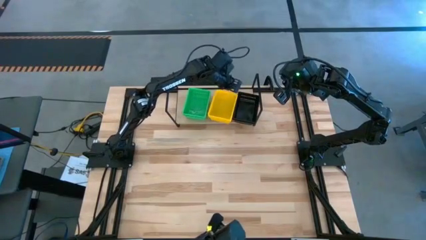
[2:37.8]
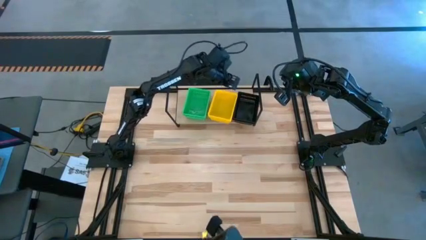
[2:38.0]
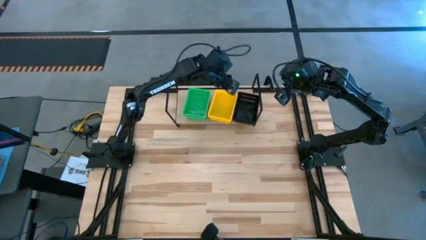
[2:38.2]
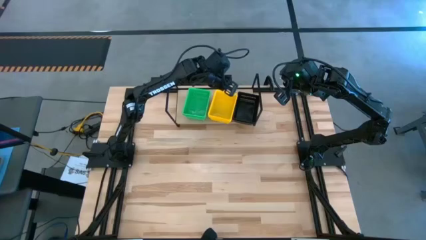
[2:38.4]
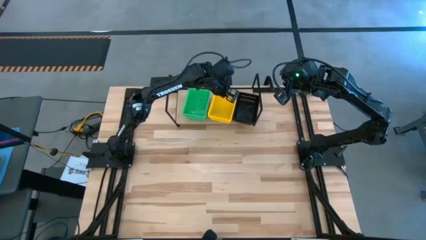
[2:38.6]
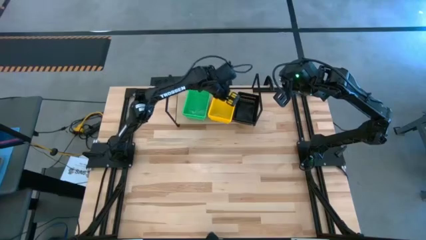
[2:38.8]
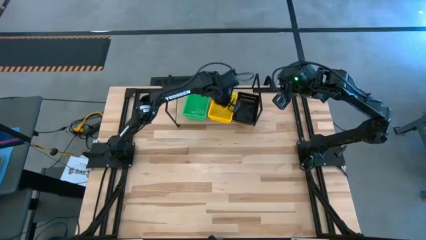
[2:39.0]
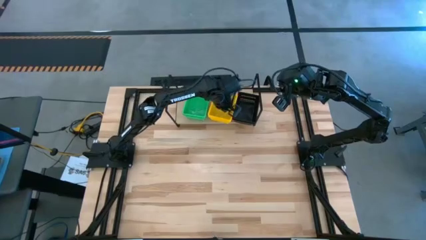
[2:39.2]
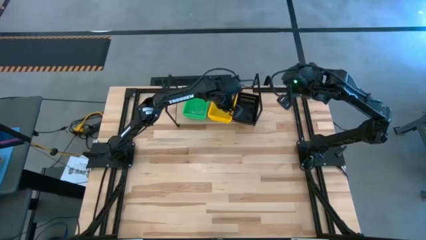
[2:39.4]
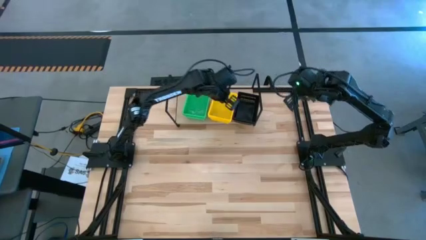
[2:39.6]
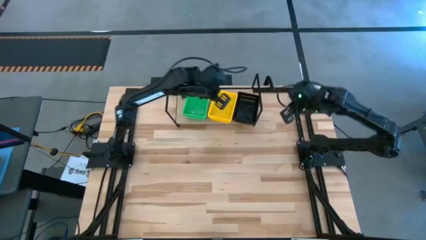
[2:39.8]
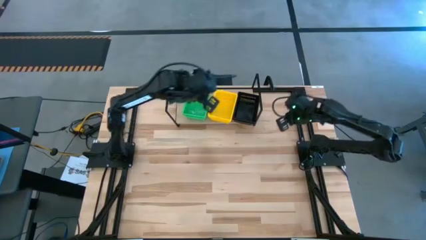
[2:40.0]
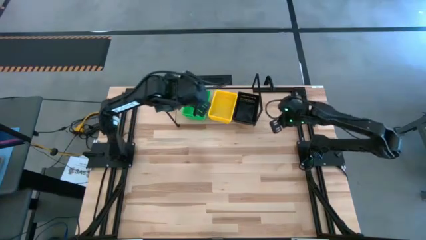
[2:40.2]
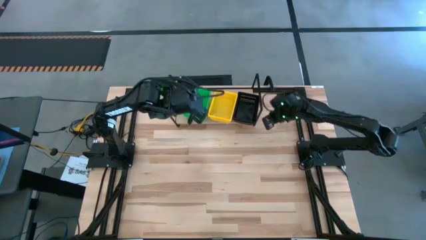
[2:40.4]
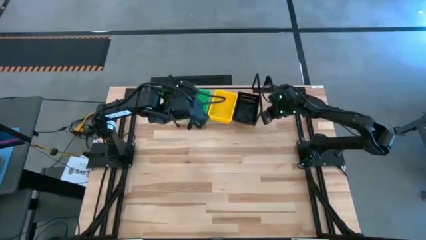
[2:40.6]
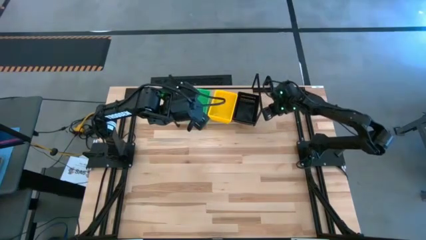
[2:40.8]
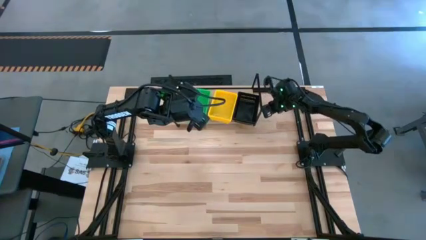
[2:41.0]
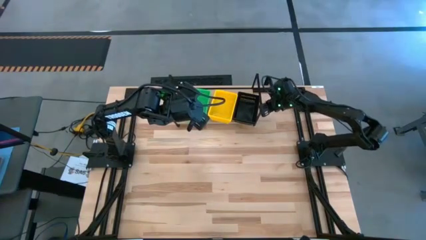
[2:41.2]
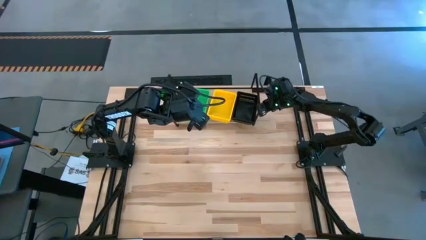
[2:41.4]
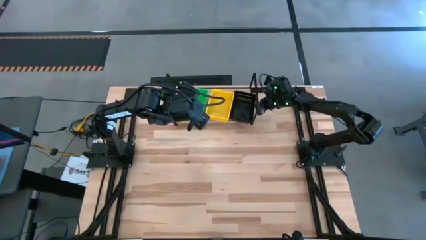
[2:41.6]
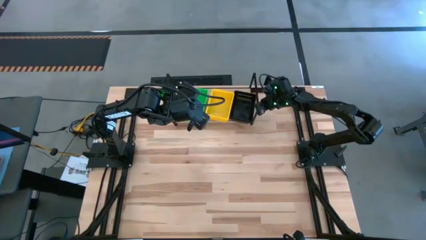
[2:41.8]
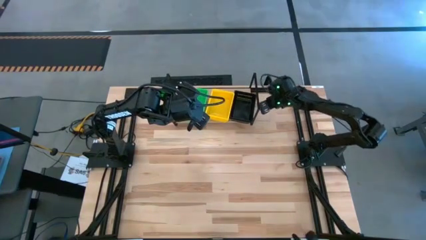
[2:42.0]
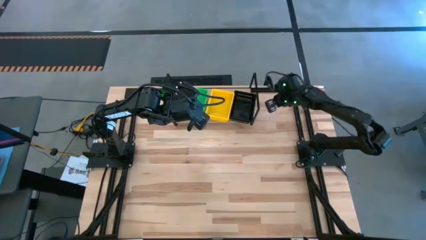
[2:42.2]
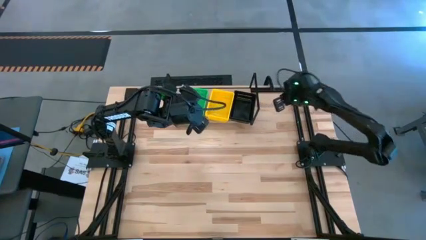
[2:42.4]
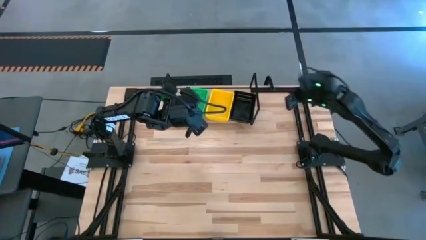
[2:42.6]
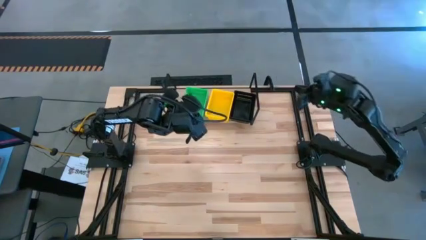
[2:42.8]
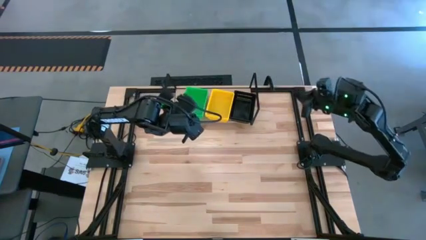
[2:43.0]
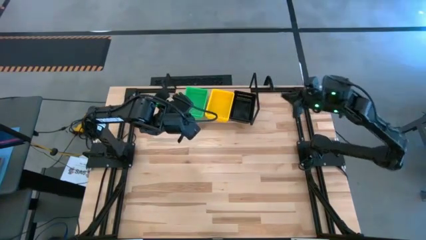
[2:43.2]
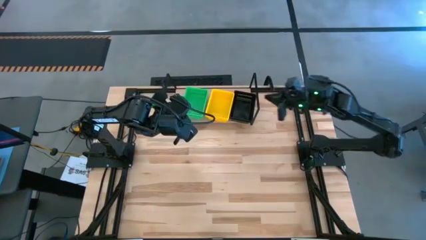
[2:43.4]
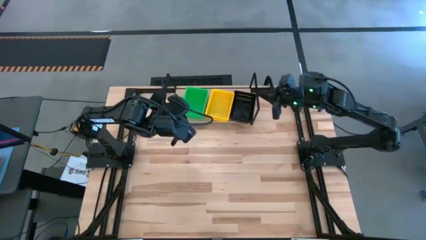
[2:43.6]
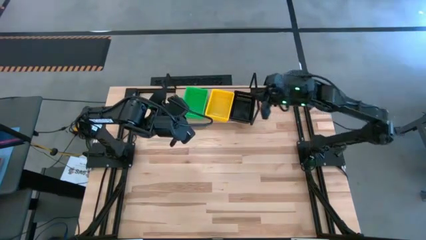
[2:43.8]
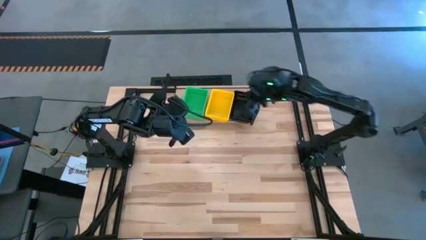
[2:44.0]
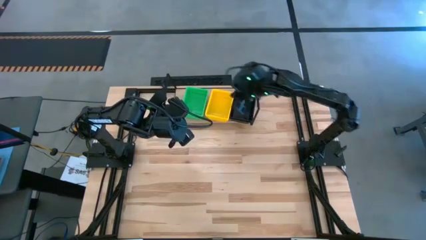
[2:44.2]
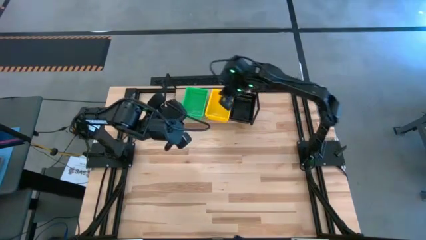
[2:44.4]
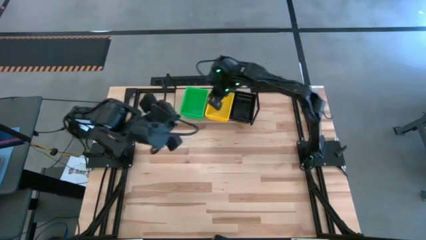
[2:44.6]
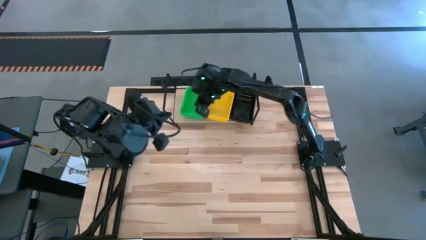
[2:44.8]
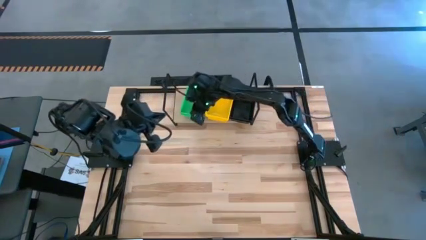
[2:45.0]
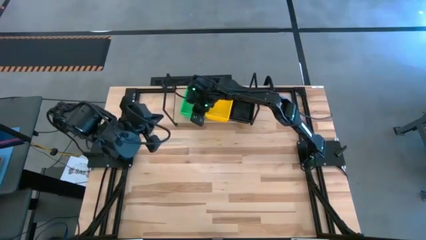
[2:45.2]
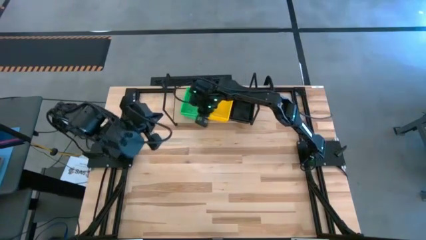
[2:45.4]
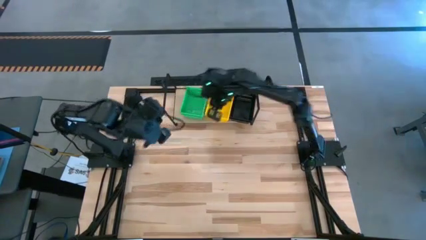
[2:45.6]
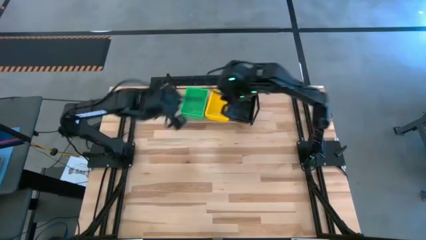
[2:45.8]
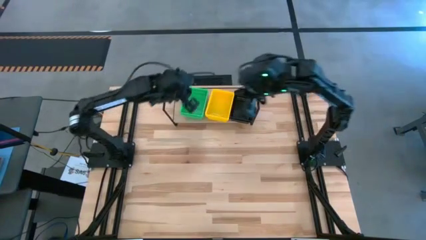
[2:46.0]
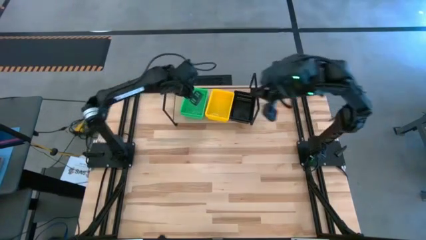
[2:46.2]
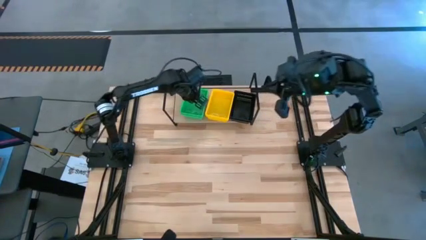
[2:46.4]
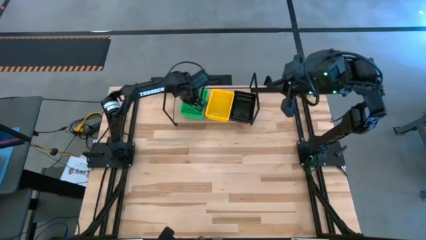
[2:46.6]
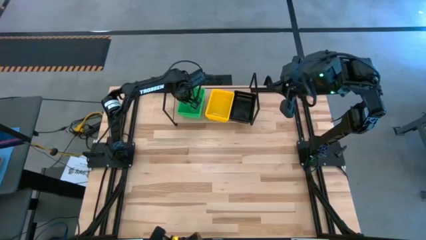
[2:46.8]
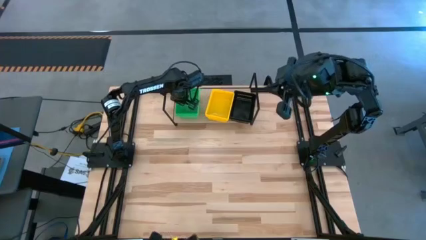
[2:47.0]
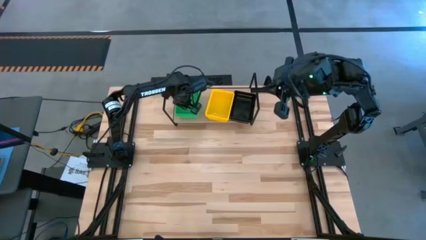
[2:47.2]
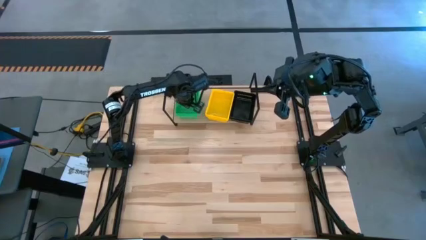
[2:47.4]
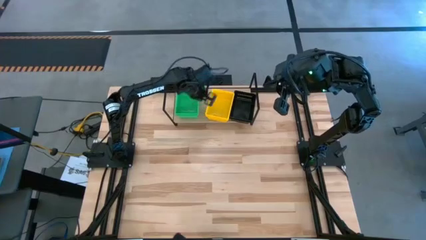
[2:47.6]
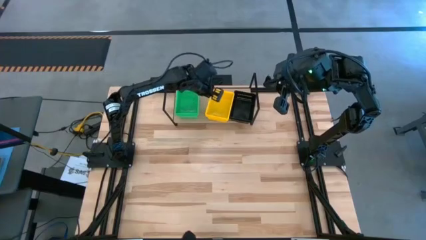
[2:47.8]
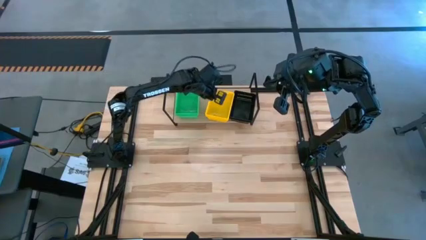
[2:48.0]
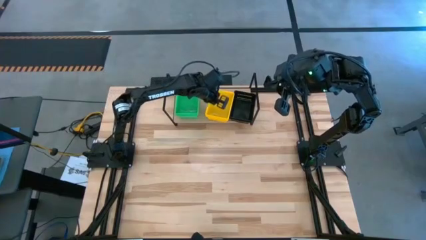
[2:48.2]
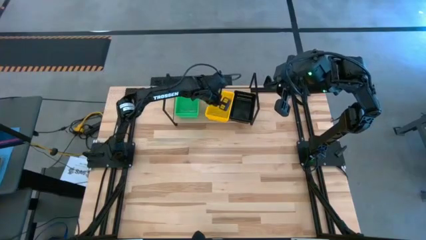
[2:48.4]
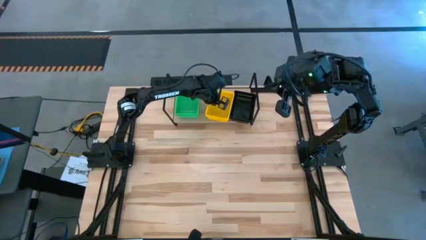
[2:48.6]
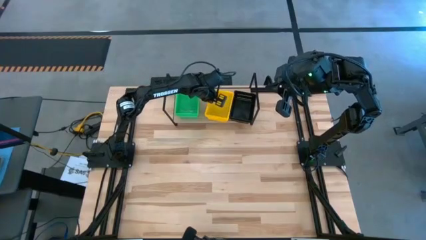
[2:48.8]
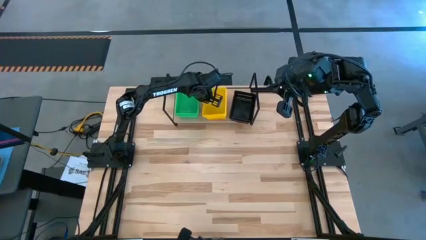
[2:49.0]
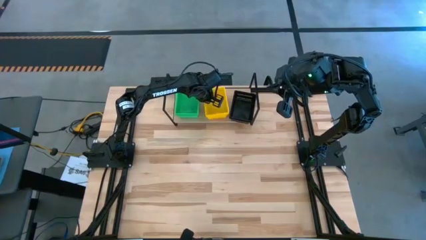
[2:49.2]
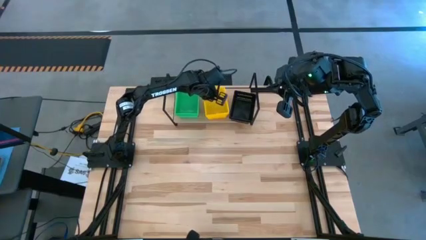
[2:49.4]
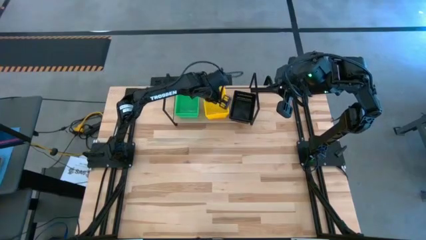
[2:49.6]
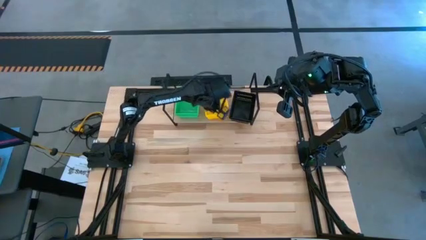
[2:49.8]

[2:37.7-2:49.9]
Task: Stack baskets on shelf by color
Adjust the stacked colored bins on the shelf

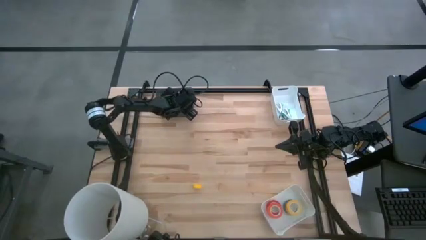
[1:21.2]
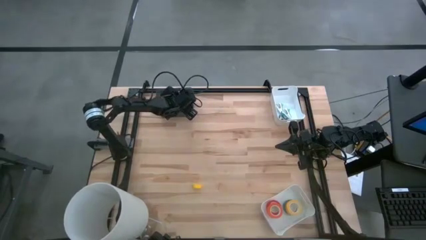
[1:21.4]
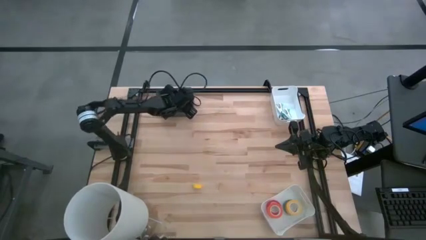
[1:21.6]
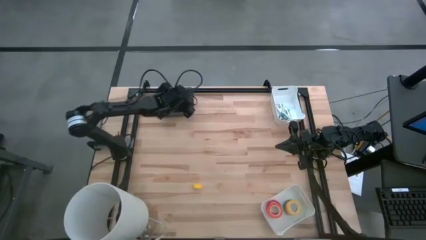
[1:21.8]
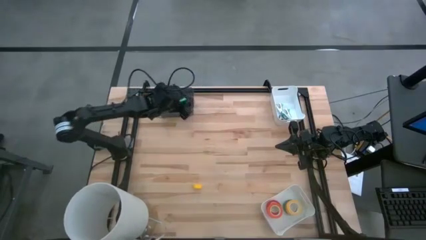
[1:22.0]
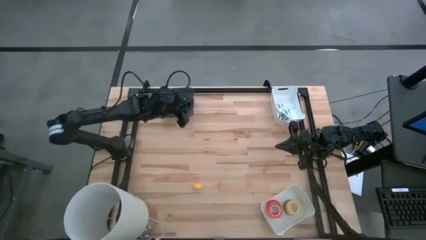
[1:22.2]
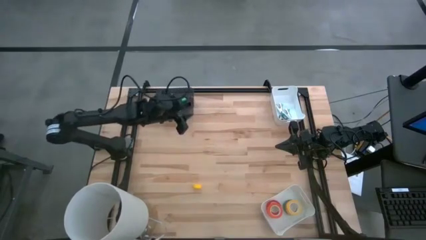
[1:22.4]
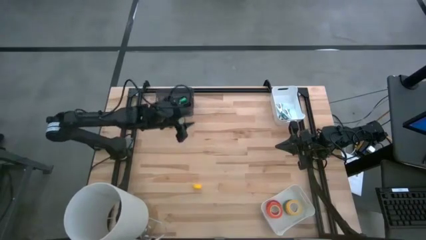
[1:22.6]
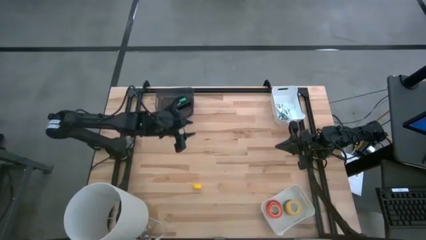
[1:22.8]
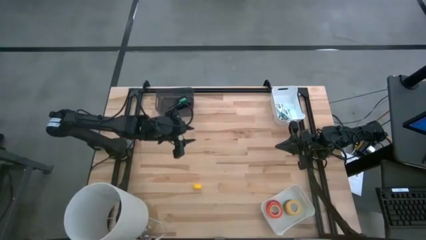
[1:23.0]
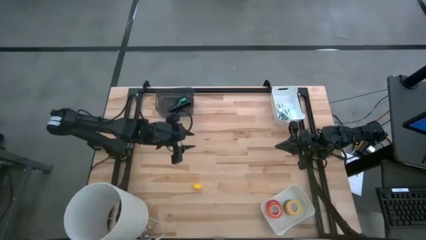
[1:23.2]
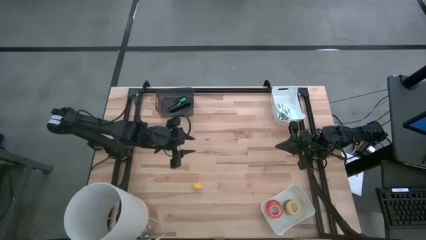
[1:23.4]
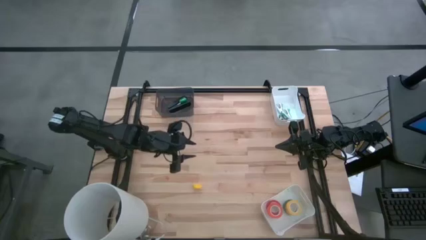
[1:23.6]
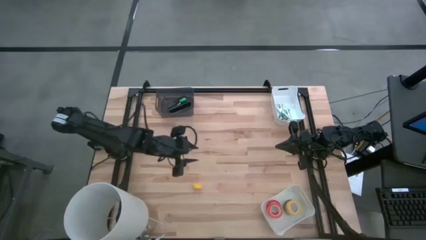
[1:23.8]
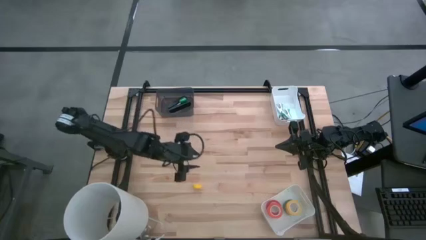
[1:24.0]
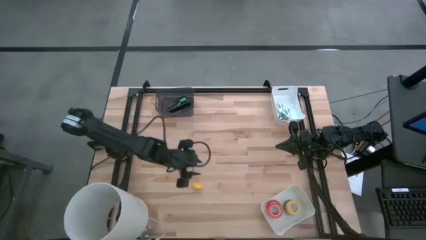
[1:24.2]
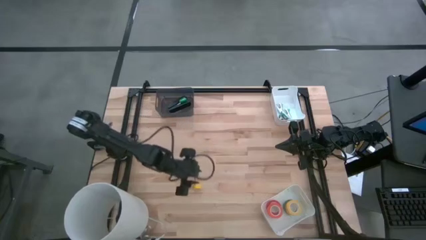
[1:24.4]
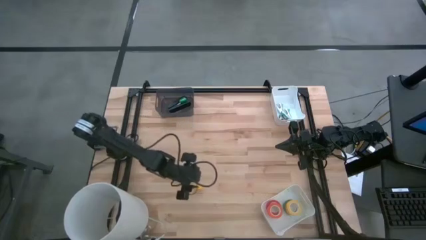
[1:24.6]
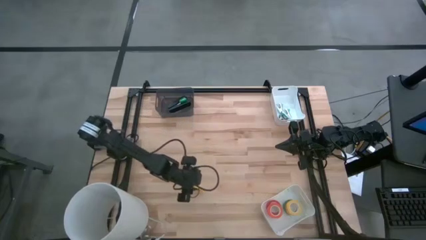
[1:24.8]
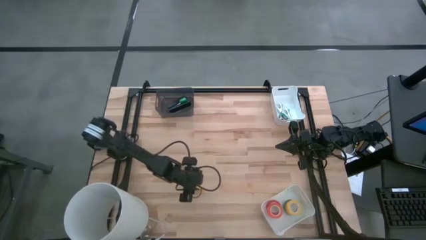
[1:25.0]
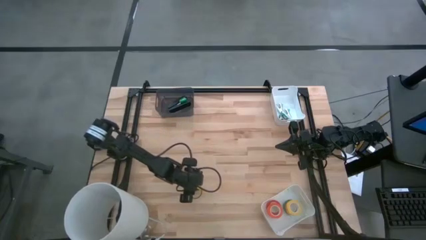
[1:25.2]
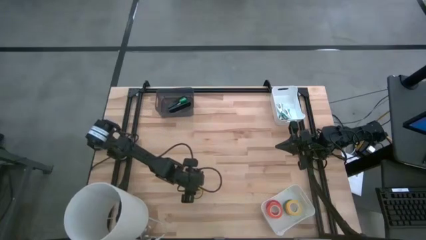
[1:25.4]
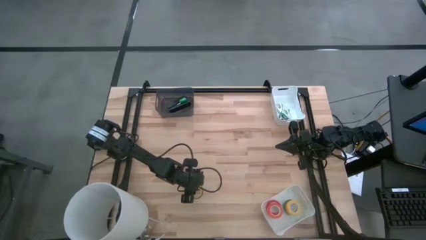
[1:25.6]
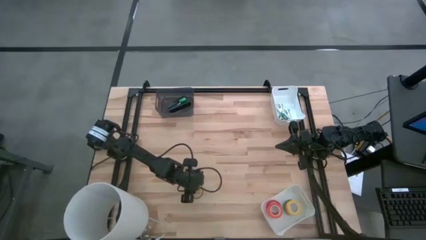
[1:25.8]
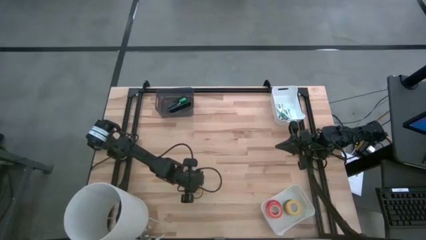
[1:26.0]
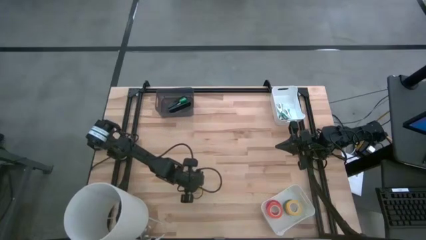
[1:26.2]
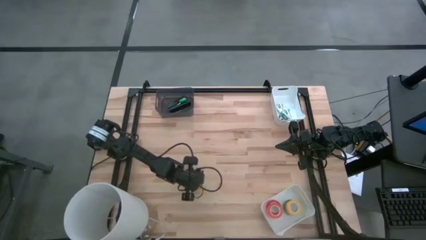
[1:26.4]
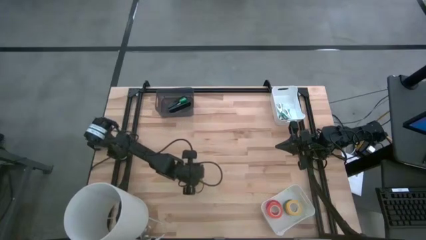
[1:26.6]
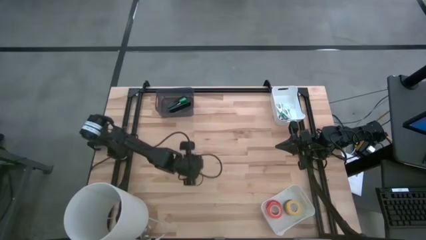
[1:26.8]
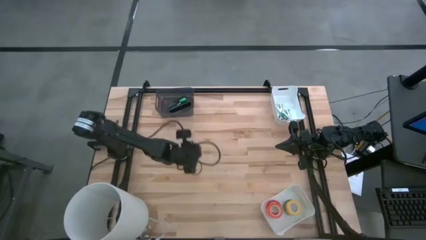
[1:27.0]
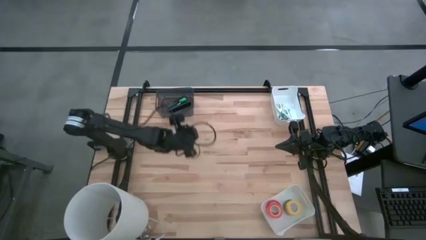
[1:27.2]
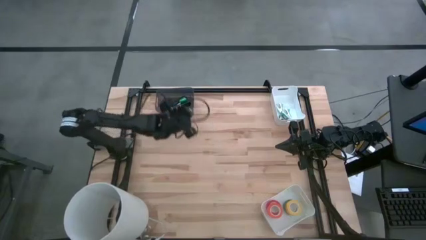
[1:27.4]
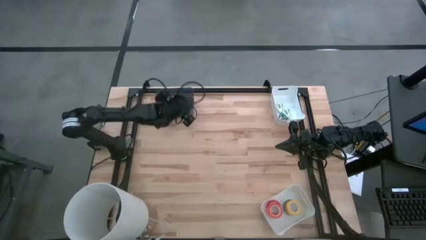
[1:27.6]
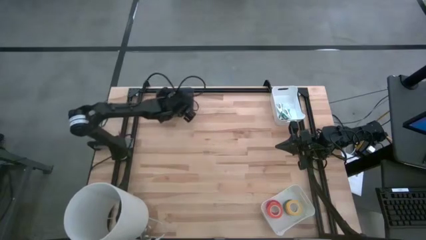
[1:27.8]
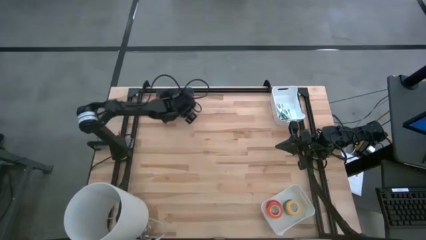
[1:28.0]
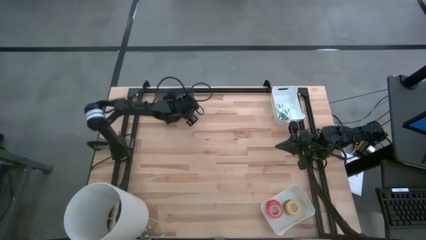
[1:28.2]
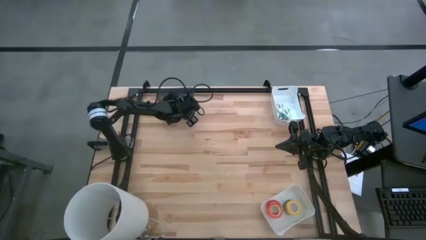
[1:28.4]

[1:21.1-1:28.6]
Task: Pick and place Stapler, Stapler remover, tape
Put the small yellow stapler into the black bin
